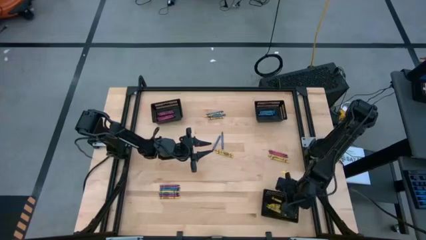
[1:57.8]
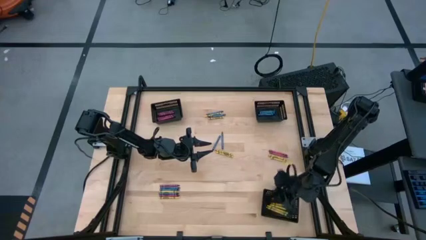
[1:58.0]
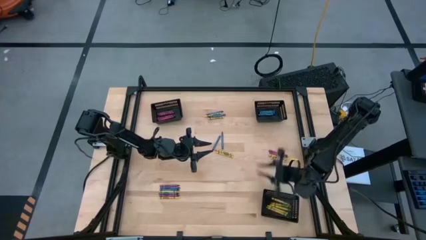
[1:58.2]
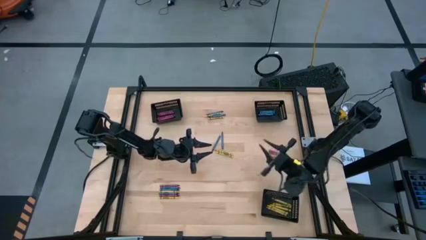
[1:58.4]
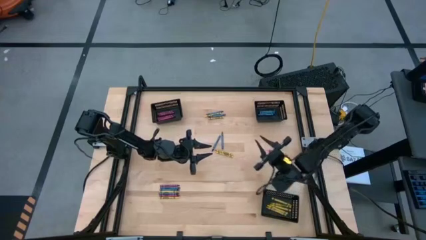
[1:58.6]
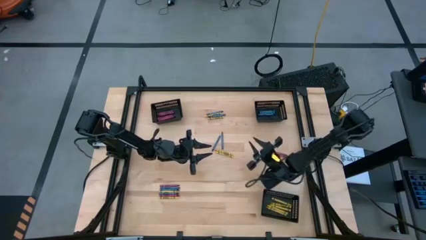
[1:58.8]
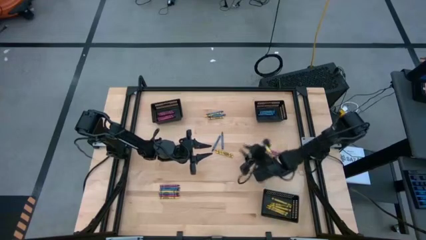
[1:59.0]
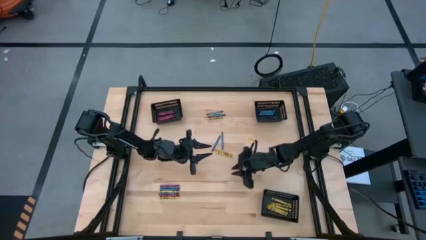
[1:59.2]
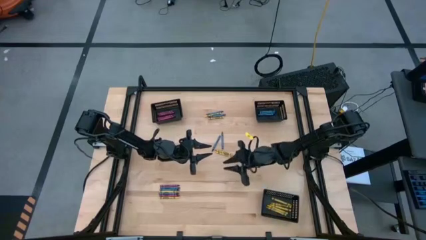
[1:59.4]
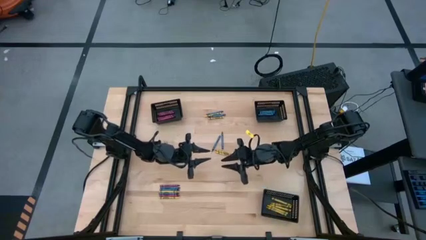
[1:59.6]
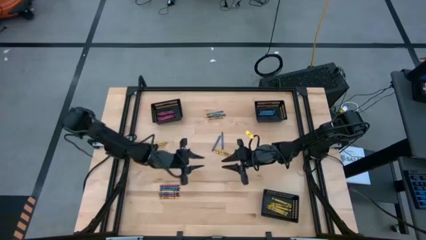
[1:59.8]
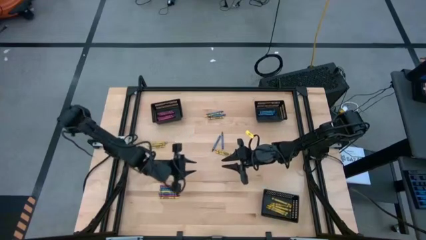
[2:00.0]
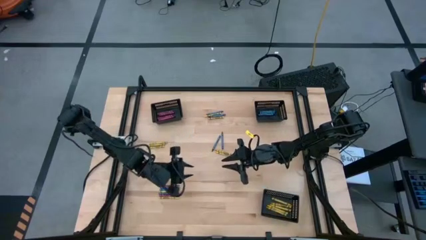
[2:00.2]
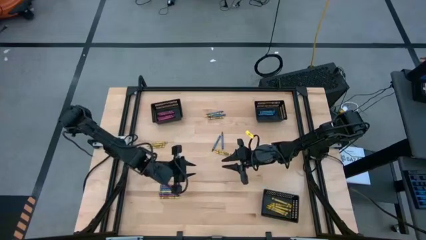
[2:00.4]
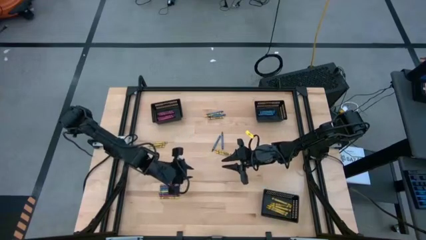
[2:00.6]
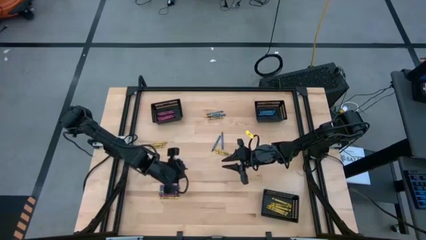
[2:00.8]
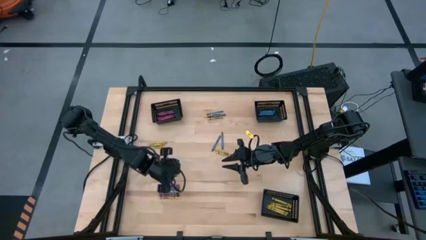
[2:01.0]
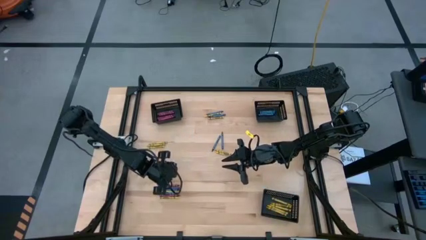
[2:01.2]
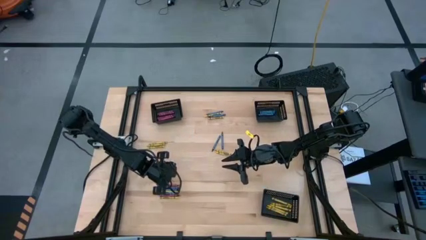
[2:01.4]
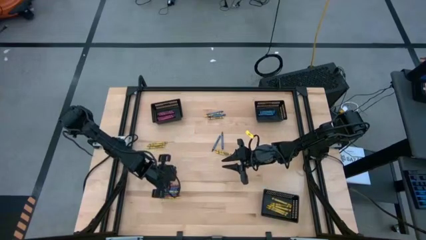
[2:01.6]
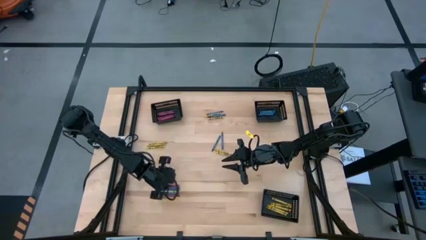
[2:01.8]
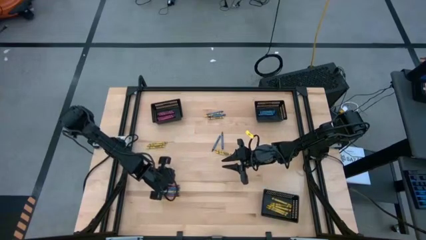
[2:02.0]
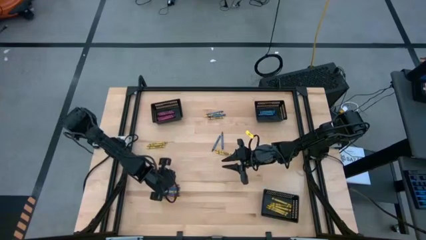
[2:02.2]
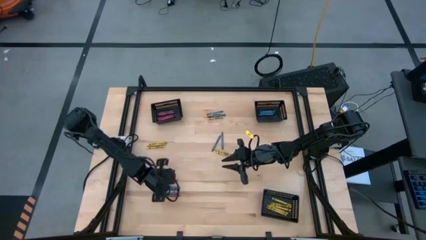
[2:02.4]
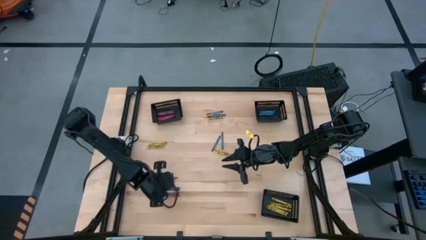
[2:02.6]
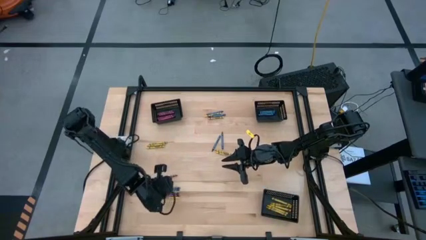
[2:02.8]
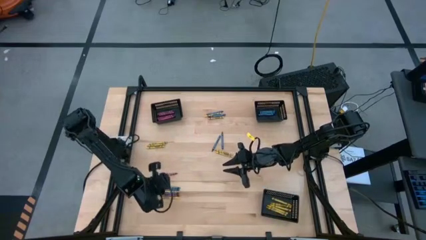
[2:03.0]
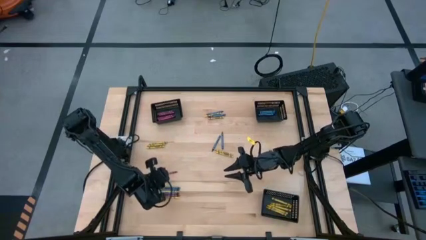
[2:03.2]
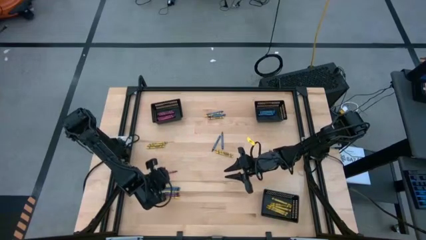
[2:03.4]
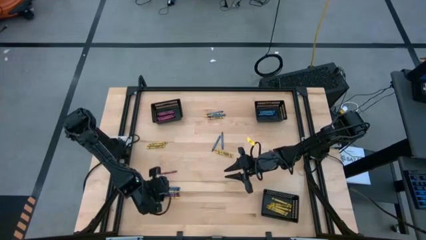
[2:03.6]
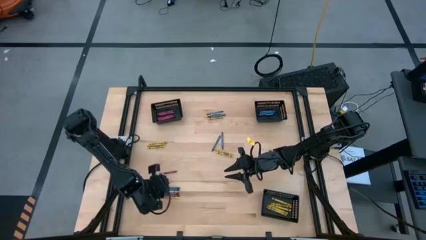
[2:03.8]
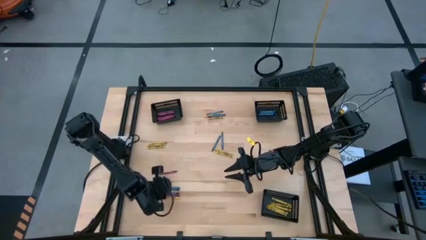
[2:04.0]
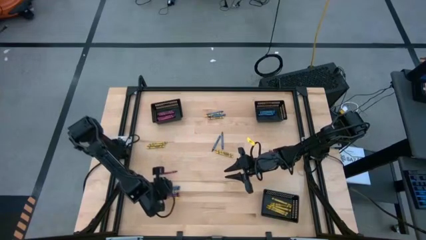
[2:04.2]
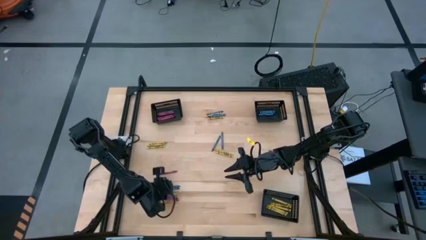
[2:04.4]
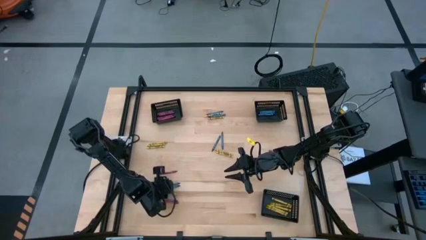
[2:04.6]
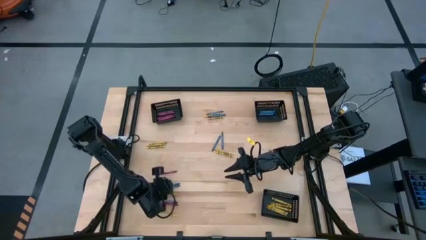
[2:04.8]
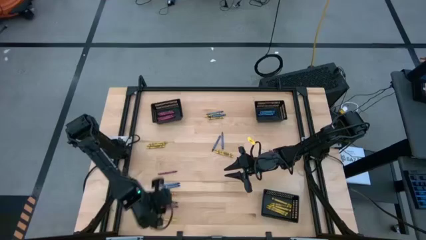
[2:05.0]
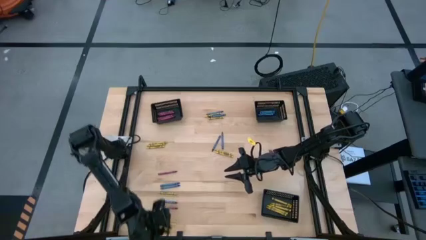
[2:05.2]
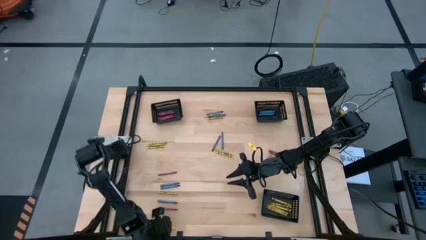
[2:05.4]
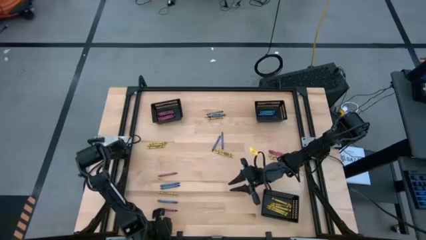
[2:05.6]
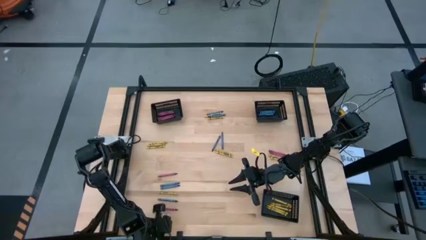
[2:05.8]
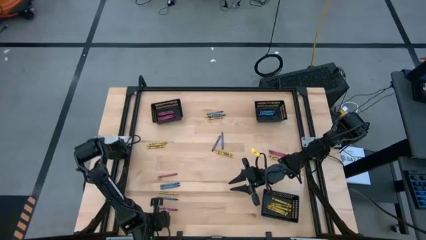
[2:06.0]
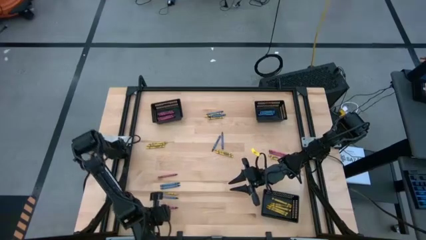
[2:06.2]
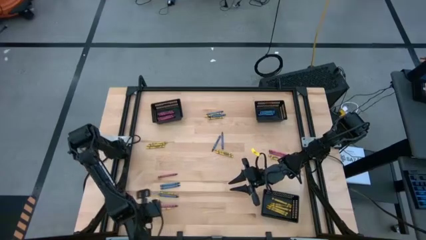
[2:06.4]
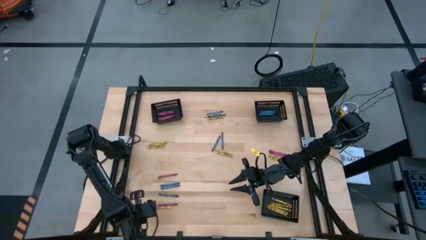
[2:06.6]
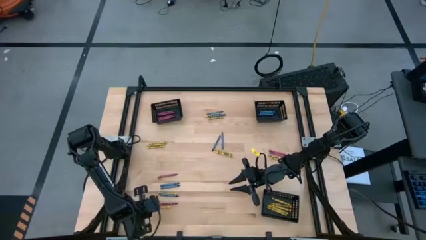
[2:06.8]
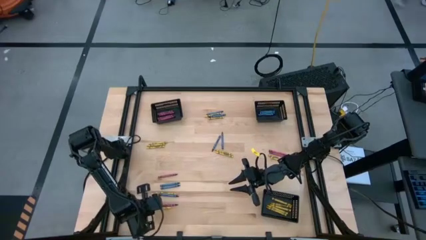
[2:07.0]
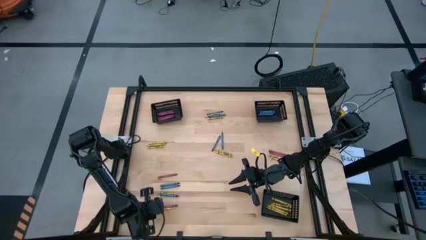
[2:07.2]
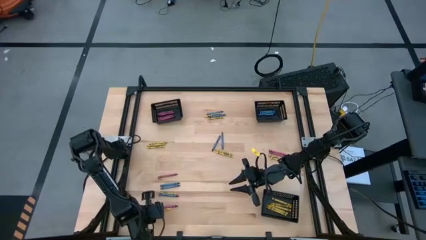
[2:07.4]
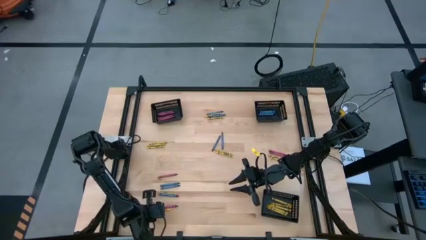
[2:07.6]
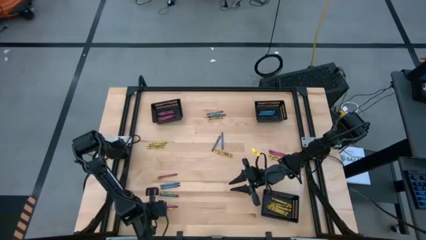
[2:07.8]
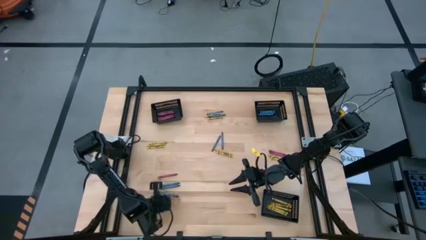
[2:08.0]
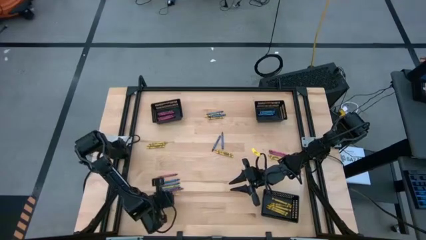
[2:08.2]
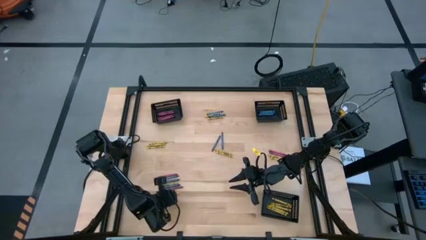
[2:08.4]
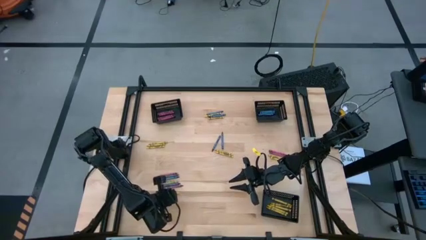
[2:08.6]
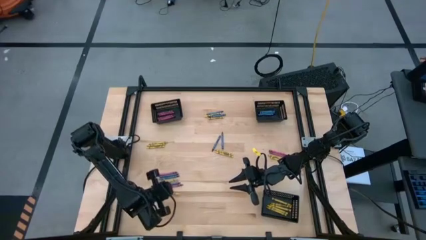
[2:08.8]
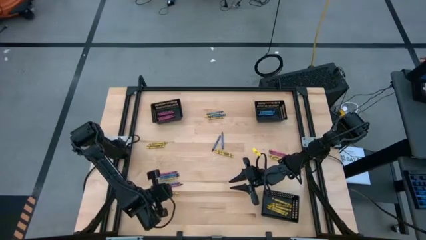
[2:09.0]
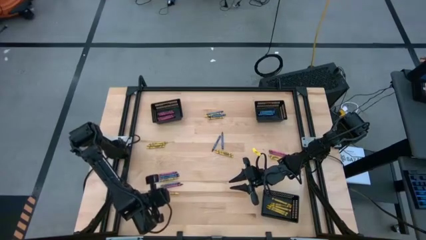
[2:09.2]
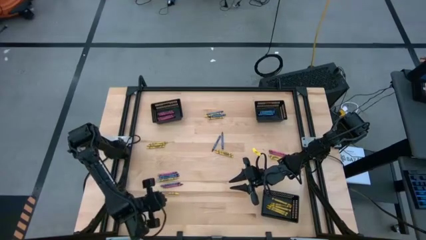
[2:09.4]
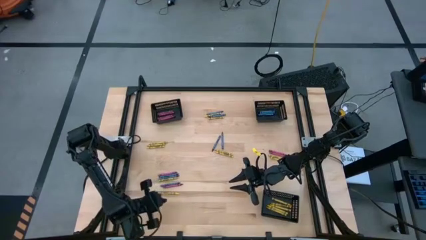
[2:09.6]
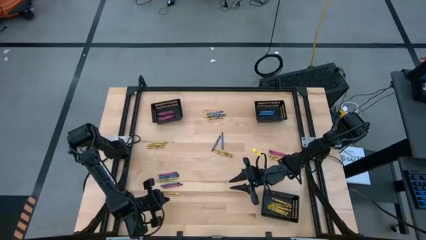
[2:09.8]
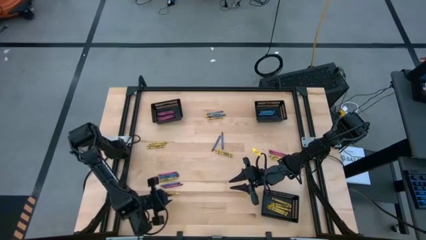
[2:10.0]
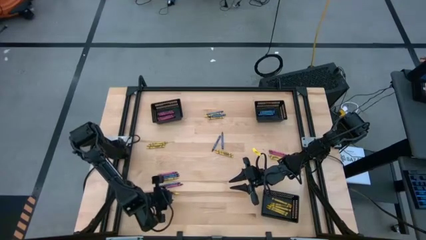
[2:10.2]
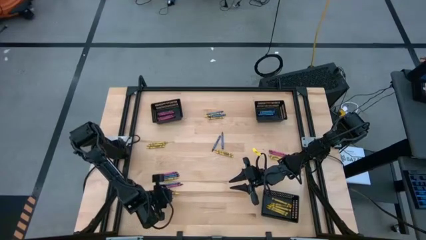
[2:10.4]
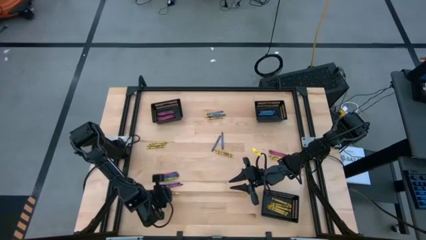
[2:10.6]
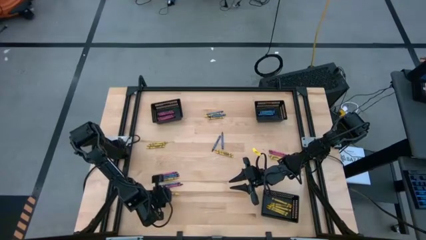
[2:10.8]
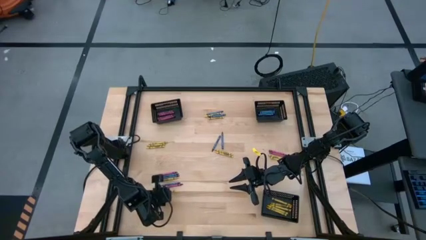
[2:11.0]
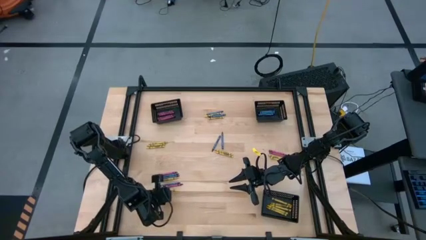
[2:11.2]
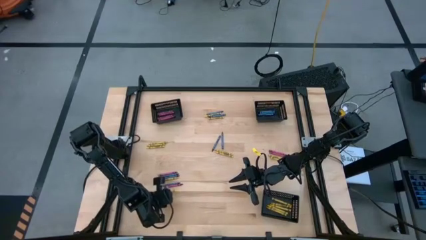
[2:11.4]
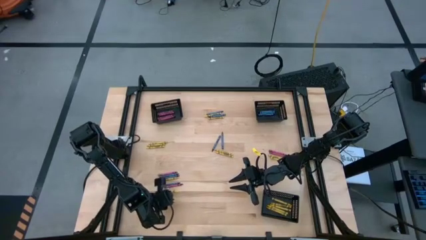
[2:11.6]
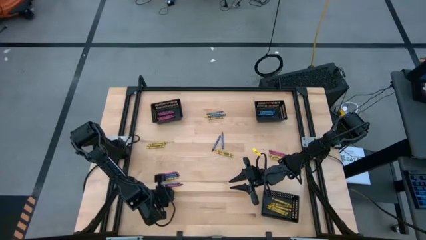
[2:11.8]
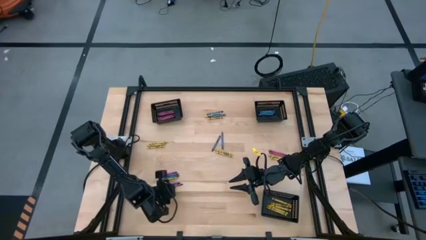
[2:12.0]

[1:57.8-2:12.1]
Task: Sort crayons
Put the yellow crayon into the bottom black bin
